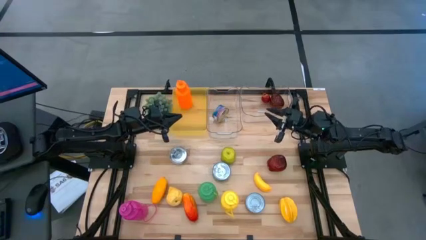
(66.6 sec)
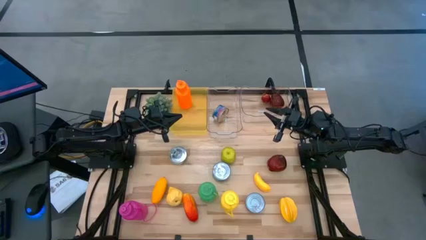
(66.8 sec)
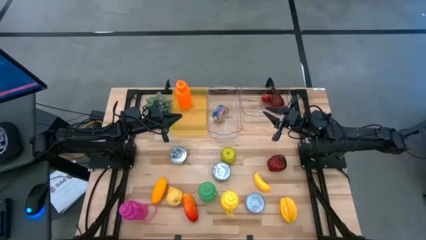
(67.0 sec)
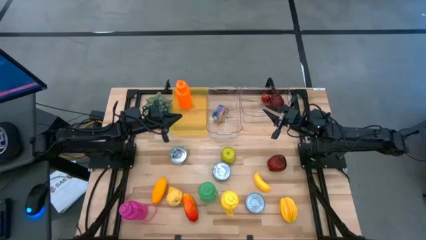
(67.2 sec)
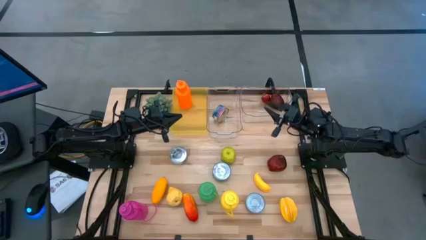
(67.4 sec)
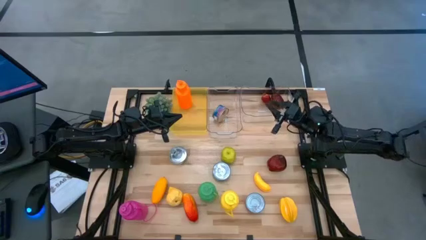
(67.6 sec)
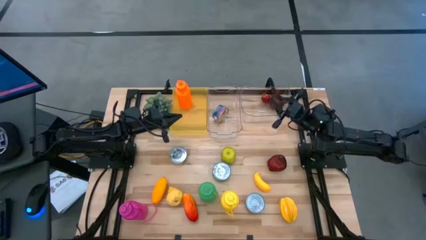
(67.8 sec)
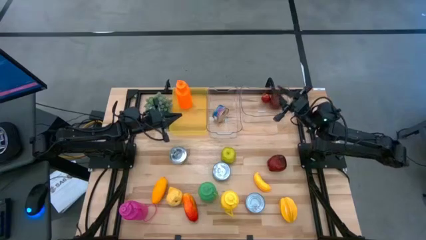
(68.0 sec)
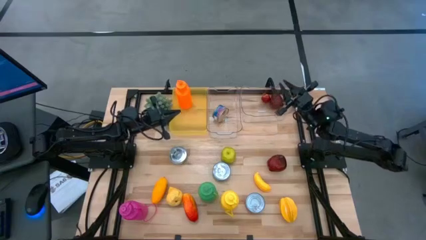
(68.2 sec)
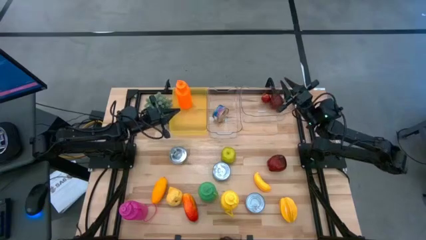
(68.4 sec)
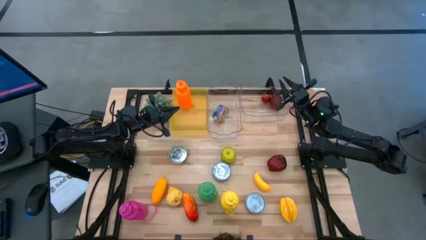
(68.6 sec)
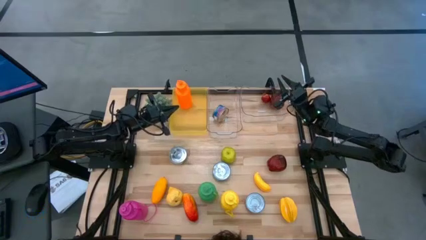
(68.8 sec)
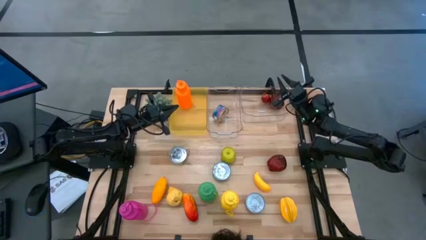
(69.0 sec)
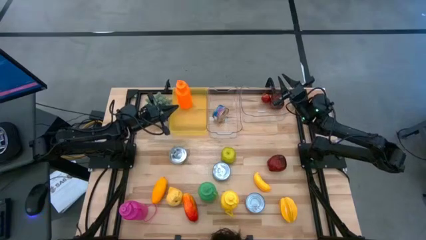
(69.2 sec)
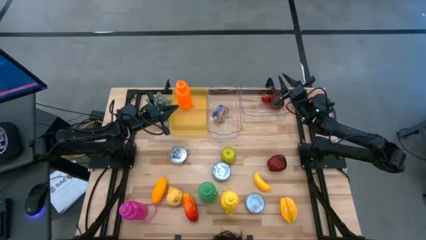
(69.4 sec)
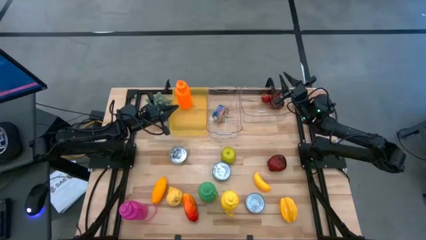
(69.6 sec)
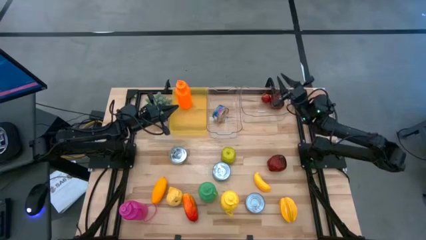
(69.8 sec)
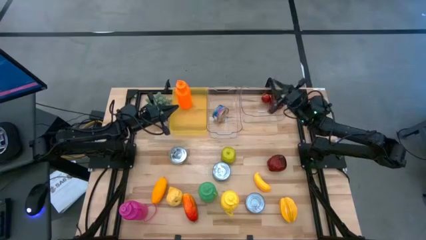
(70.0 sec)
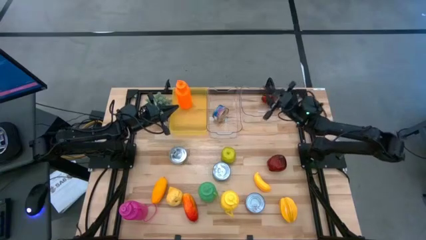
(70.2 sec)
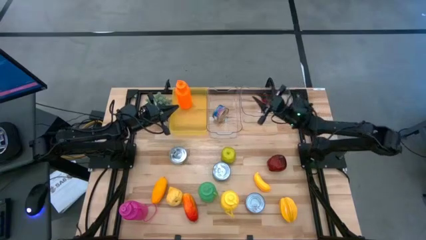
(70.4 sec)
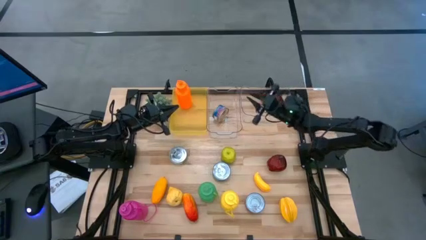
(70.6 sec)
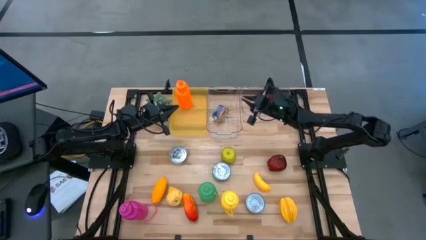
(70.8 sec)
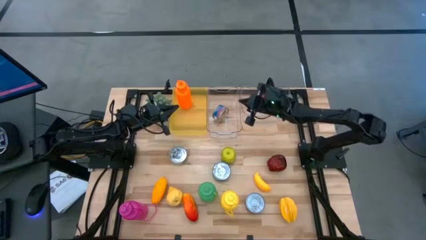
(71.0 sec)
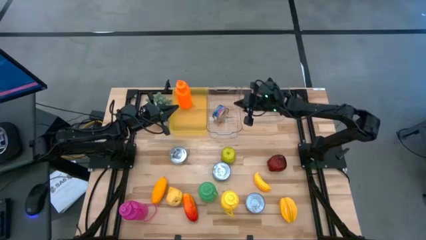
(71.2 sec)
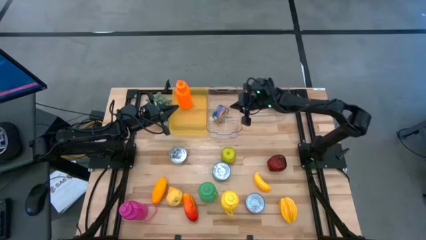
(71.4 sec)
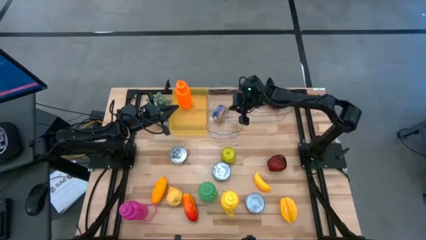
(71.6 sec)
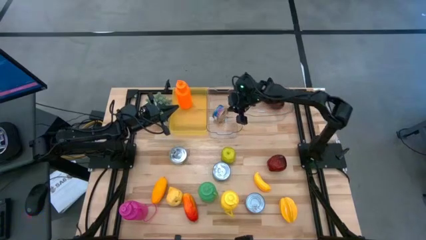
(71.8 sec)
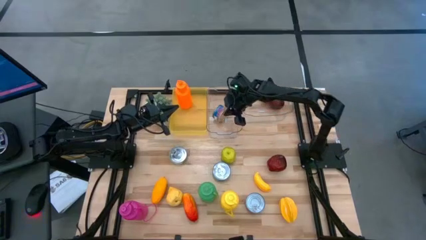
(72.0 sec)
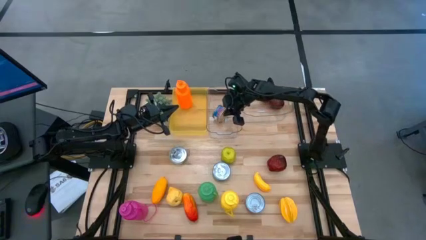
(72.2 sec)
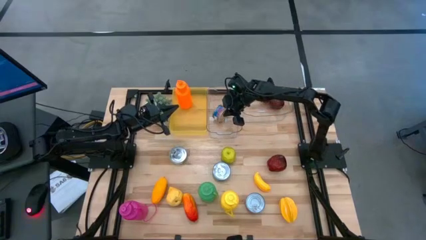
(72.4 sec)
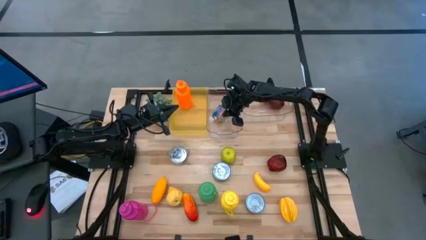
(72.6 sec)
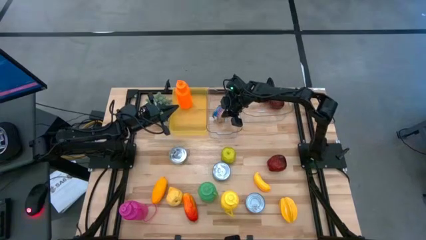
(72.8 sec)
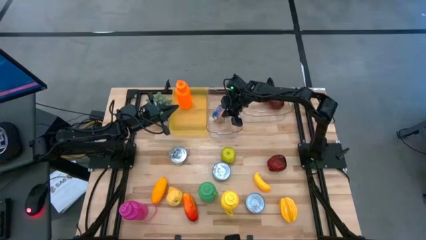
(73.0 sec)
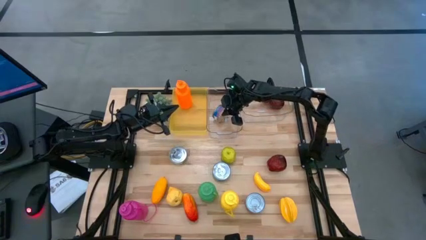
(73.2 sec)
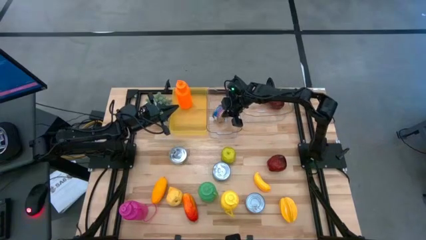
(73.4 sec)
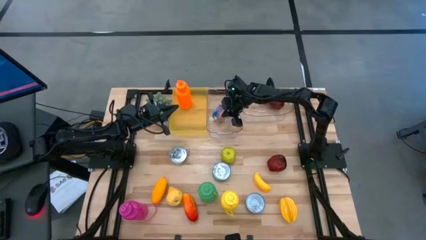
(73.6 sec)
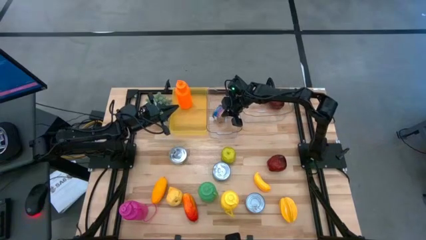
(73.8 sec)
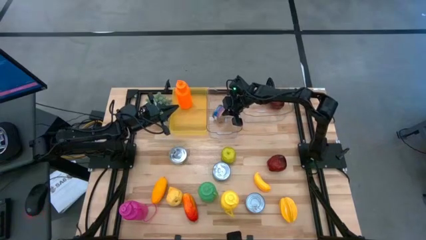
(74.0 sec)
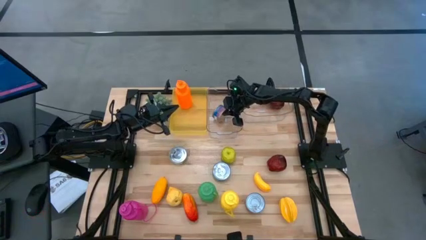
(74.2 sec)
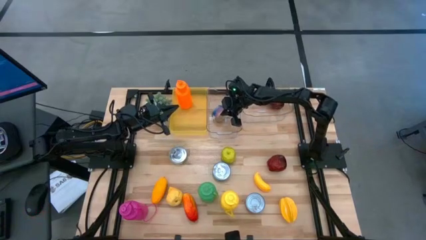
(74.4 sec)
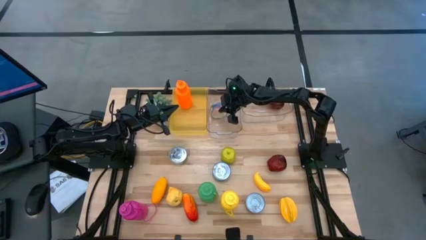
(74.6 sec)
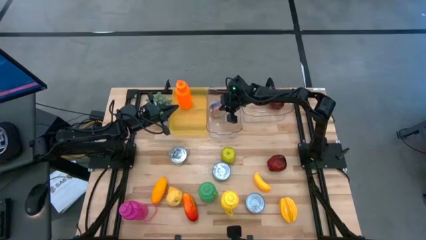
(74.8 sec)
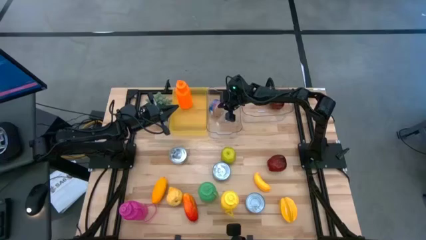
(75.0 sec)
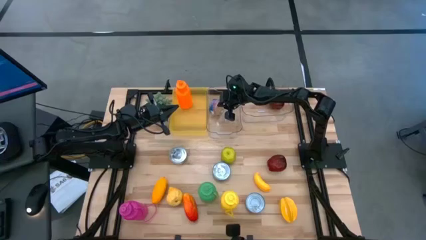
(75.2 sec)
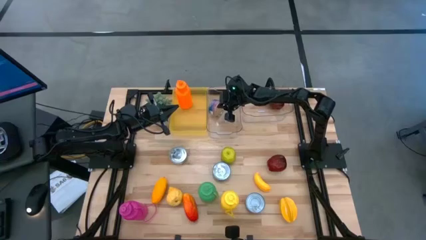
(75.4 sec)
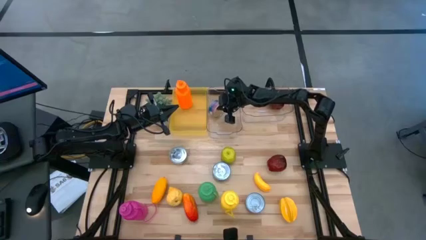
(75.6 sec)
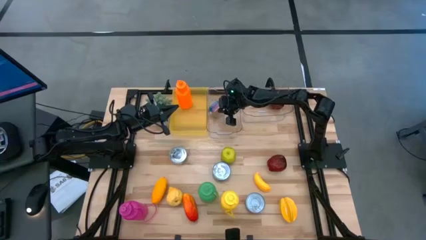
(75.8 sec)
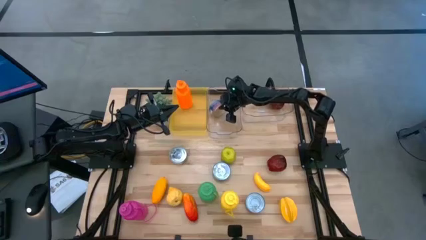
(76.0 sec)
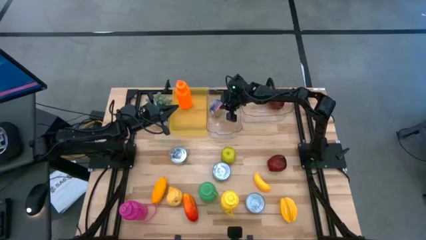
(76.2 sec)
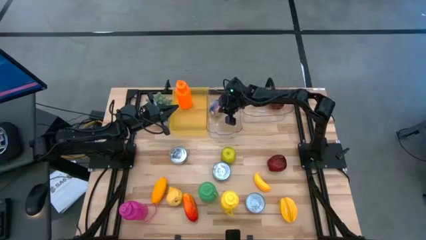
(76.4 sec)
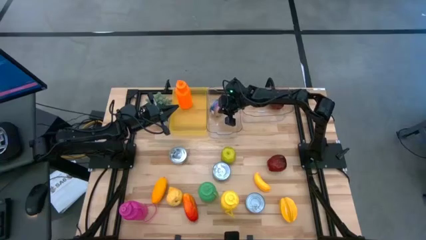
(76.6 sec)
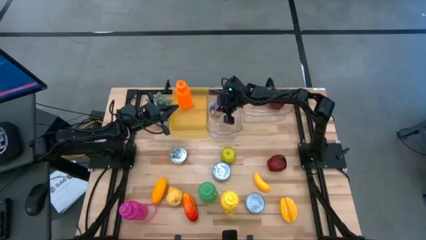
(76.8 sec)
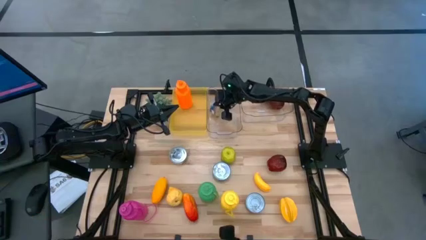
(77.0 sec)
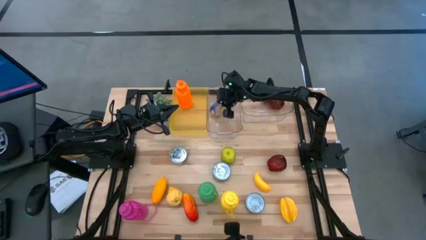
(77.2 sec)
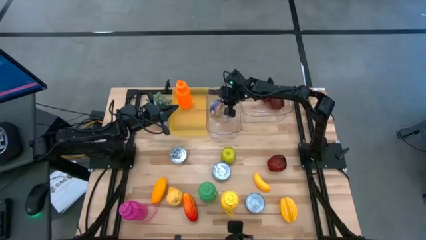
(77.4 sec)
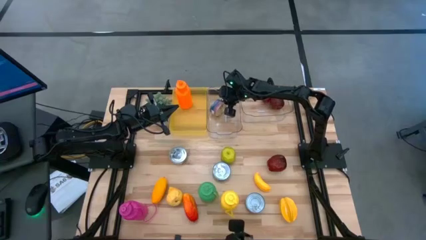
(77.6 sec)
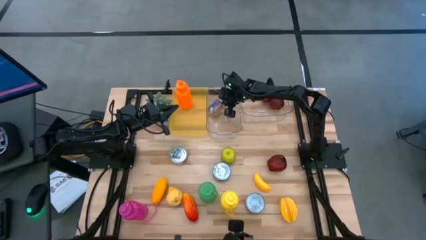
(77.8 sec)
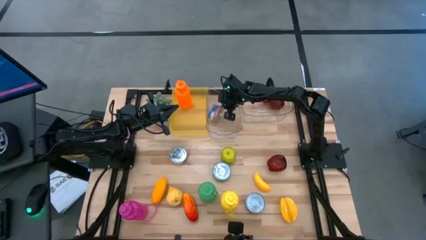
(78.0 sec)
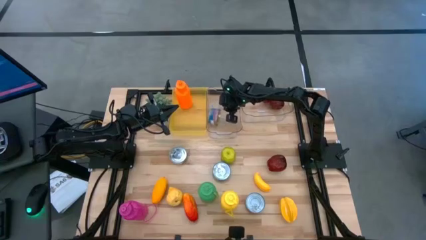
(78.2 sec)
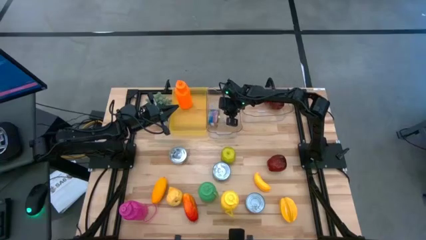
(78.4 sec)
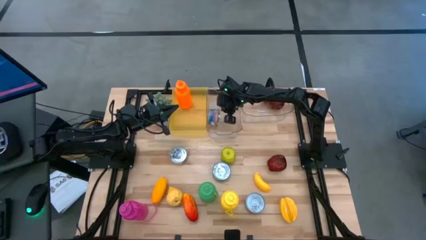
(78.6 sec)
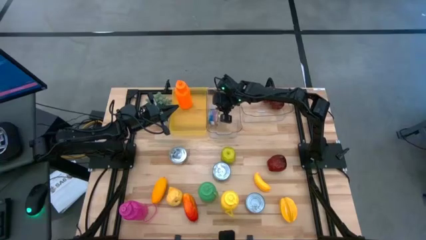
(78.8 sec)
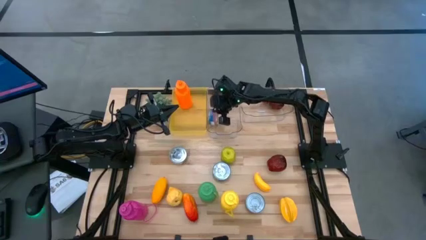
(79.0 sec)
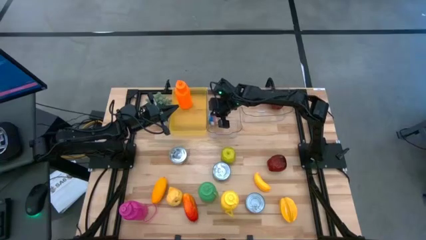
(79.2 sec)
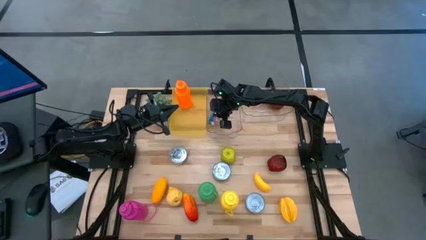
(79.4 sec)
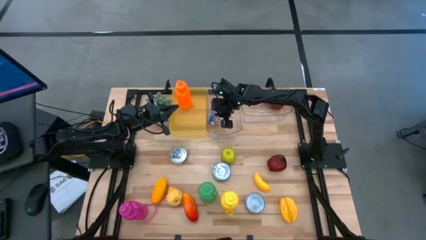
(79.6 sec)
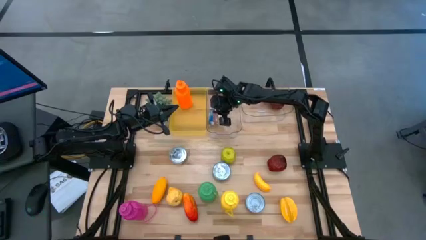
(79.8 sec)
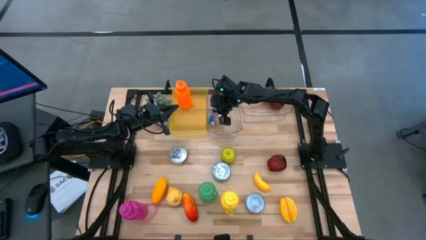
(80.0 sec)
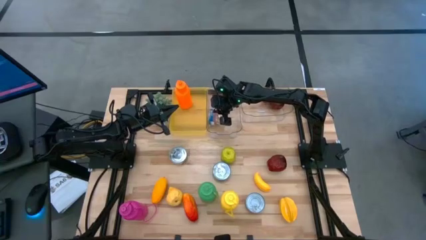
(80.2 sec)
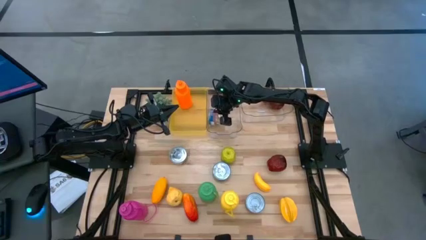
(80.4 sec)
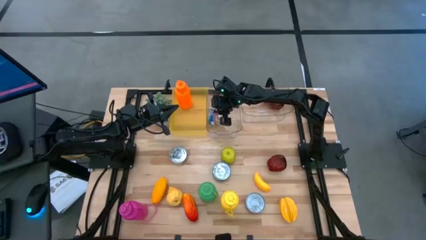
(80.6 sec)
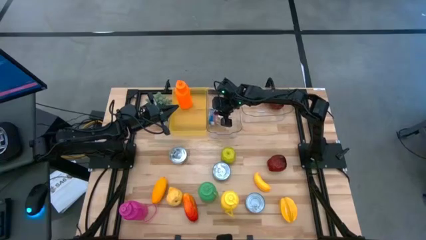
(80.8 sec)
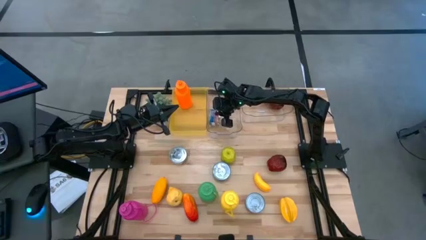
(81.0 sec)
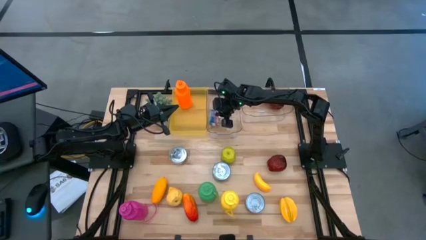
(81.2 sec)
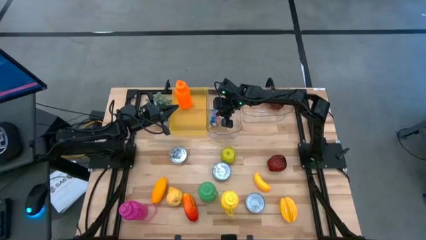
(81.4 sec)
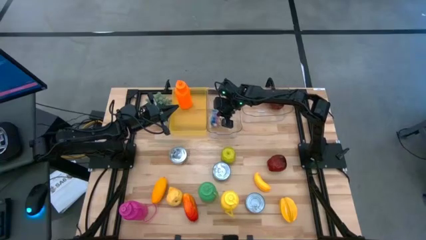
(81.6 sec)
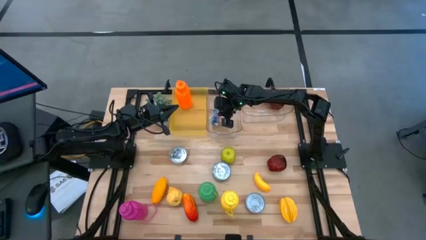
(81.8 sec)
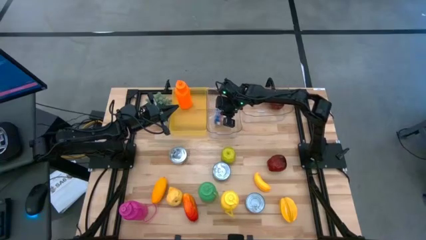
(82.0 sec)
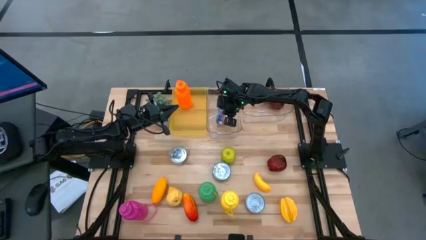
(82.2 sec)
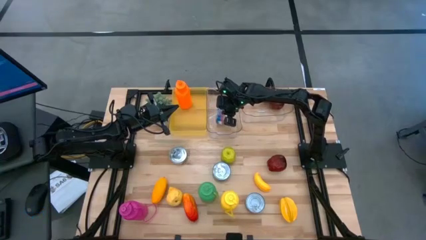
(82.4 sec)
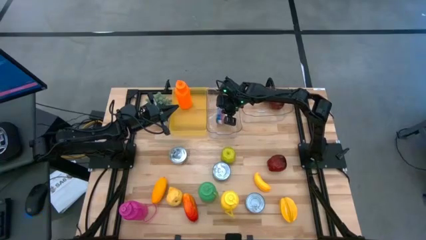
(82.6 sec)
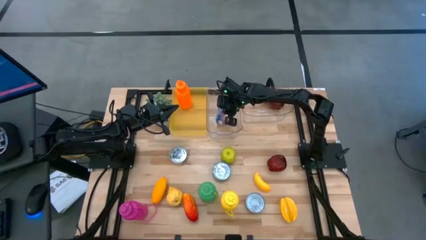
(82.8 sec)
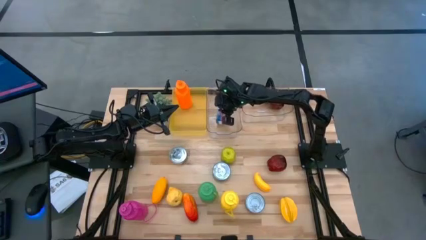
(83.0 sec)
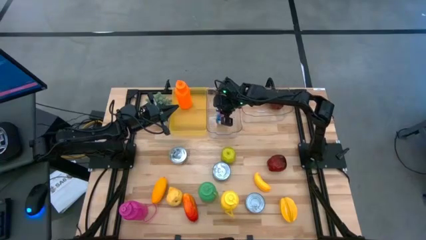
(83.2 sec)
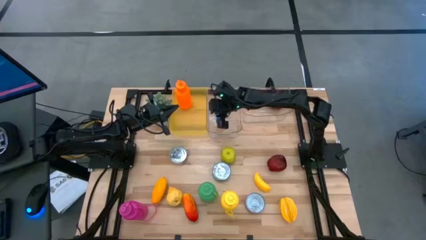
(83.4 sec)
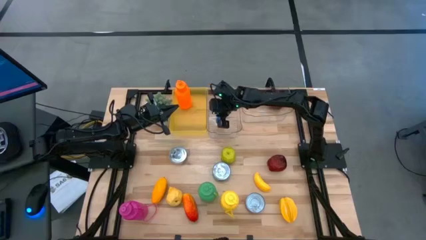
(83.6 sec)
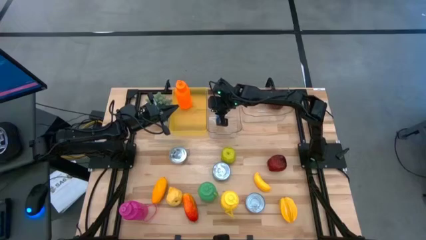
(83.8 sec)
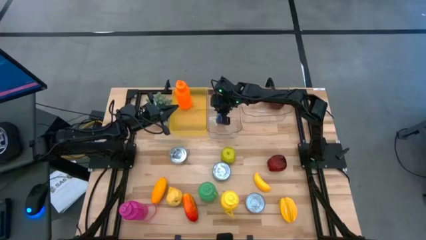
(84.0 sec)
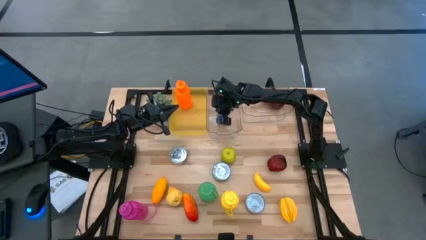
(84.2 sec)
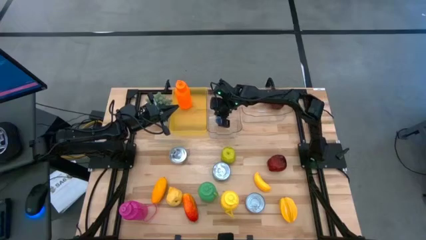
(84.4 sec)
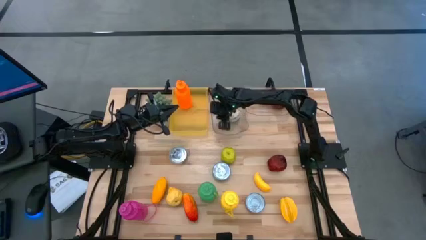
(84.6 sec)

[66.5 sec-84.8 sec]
Task: Pick & Place Food Item
Put the blue tuna can into the left transparent bin
